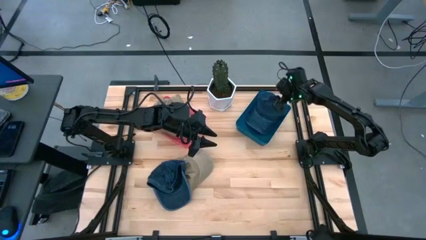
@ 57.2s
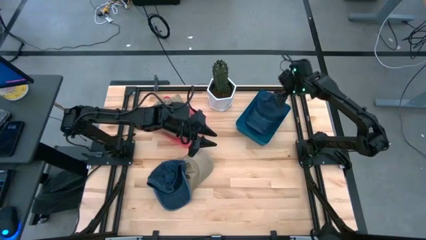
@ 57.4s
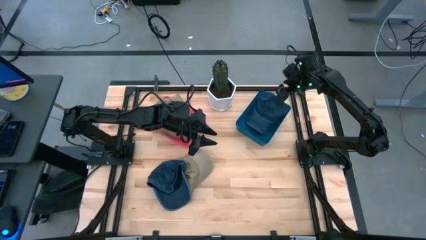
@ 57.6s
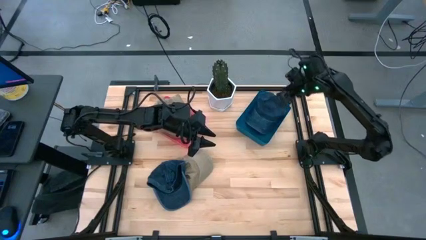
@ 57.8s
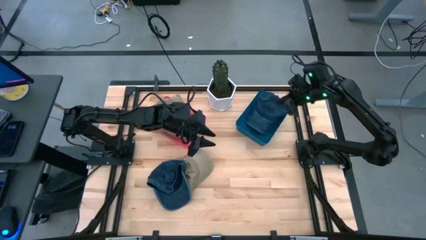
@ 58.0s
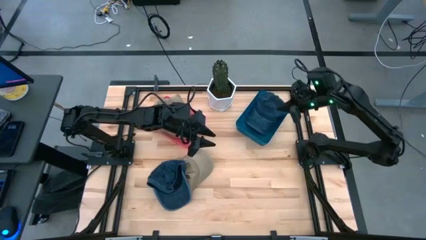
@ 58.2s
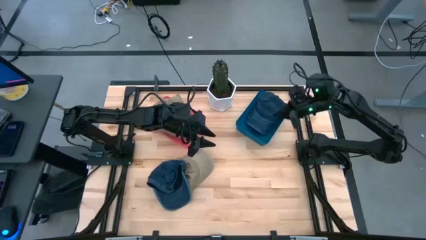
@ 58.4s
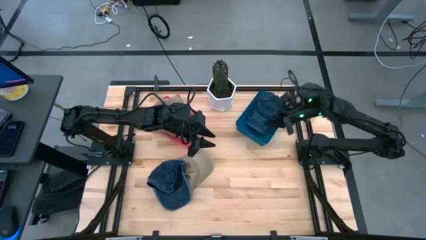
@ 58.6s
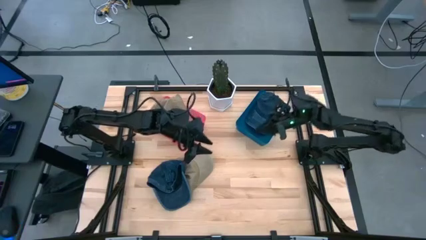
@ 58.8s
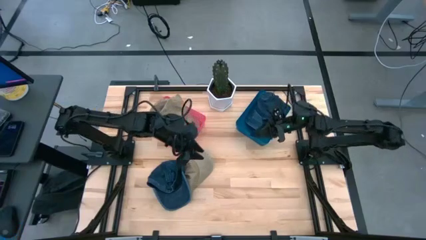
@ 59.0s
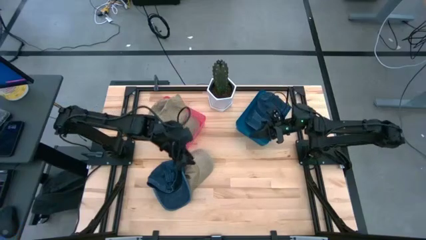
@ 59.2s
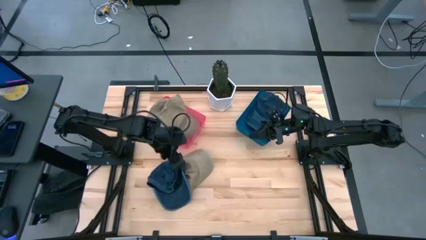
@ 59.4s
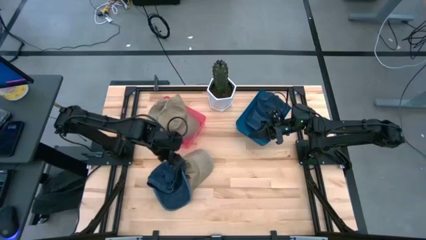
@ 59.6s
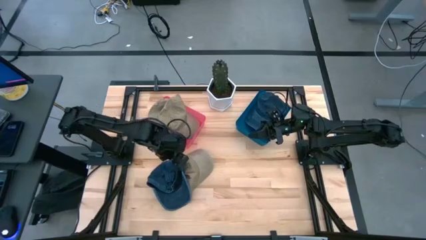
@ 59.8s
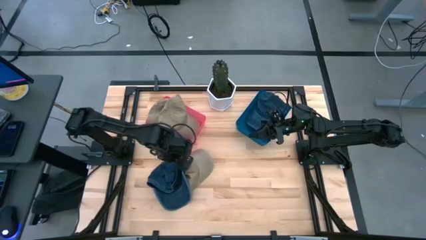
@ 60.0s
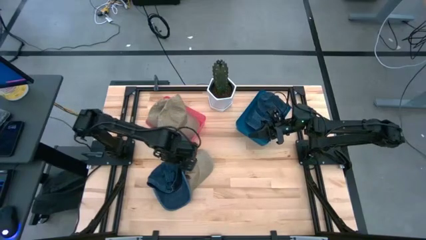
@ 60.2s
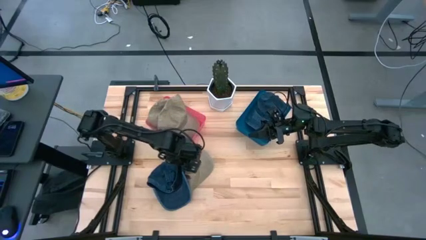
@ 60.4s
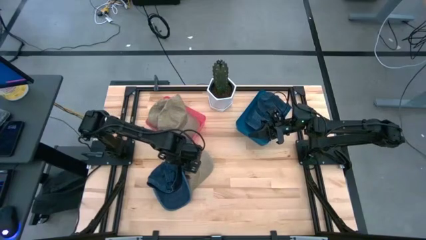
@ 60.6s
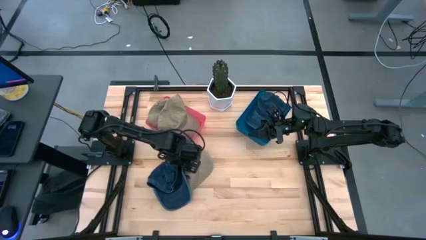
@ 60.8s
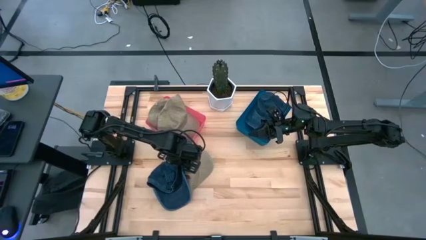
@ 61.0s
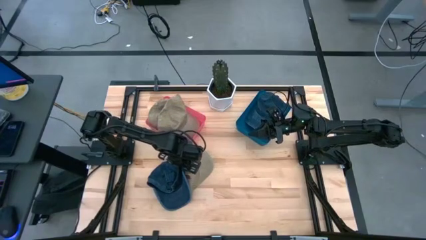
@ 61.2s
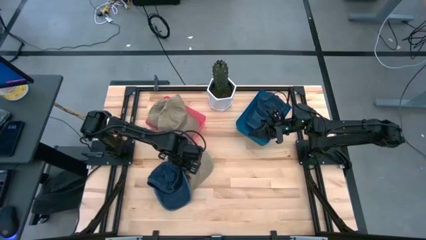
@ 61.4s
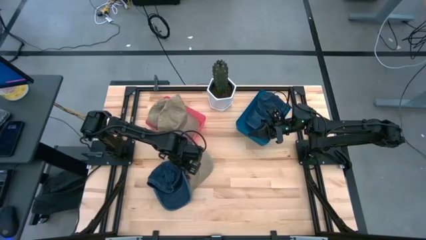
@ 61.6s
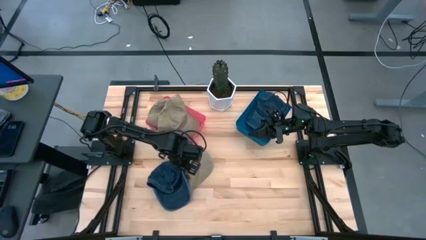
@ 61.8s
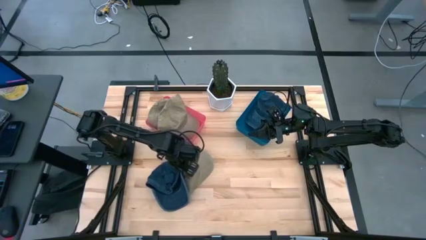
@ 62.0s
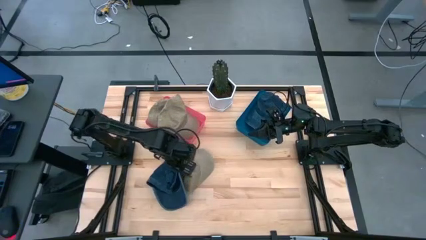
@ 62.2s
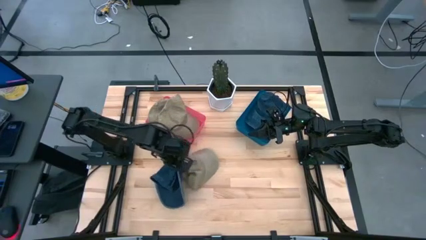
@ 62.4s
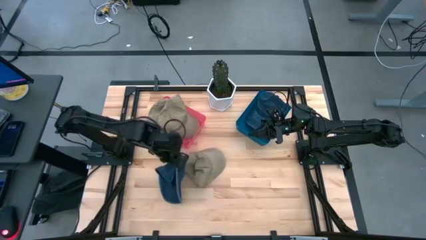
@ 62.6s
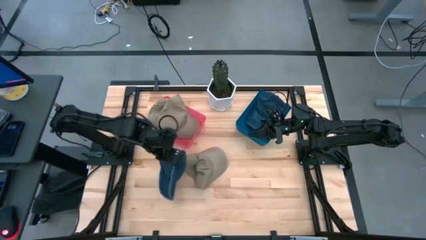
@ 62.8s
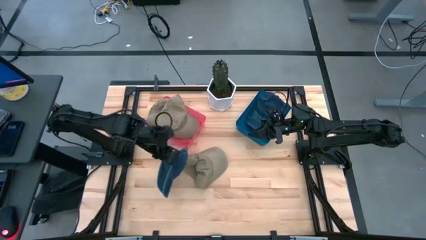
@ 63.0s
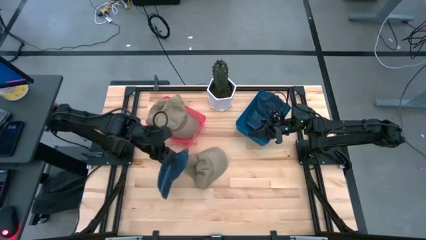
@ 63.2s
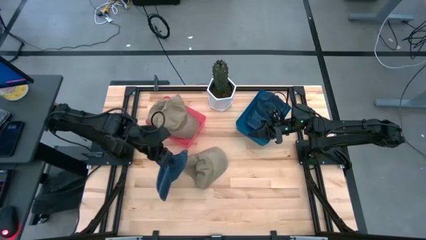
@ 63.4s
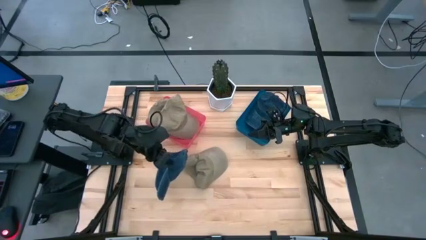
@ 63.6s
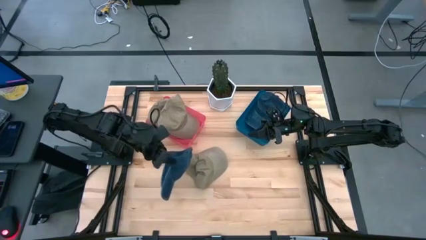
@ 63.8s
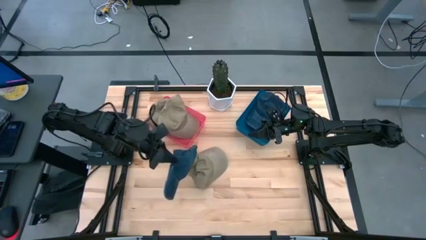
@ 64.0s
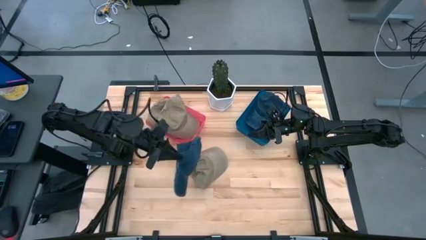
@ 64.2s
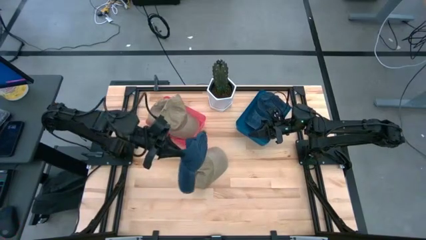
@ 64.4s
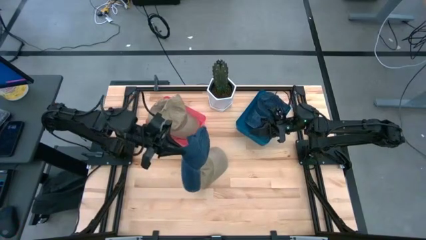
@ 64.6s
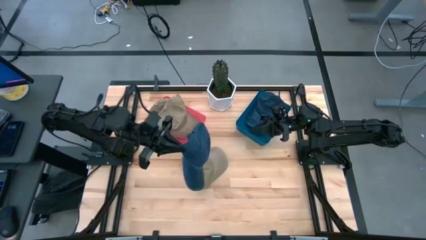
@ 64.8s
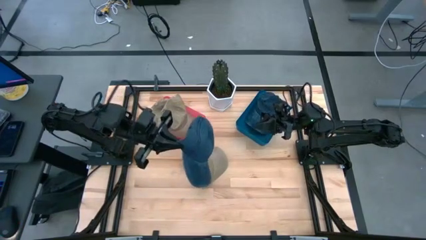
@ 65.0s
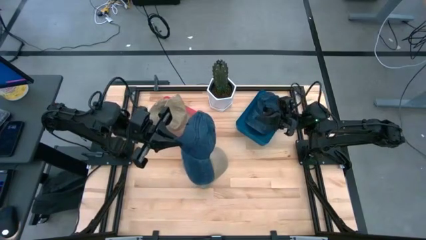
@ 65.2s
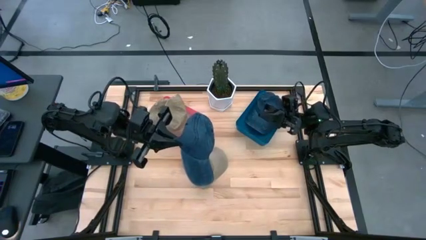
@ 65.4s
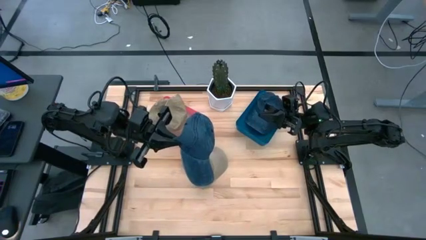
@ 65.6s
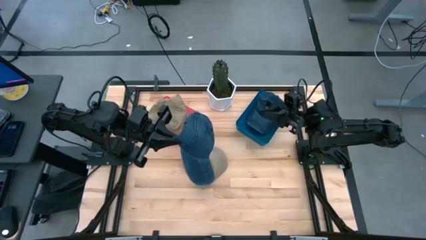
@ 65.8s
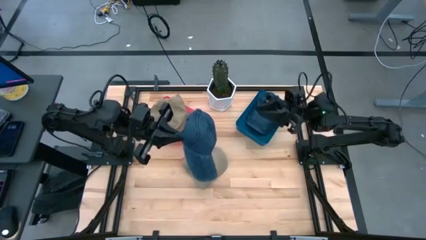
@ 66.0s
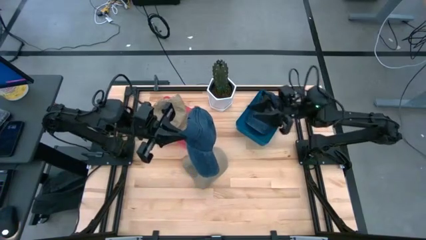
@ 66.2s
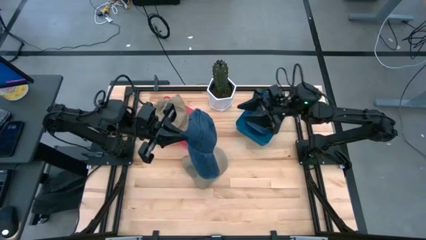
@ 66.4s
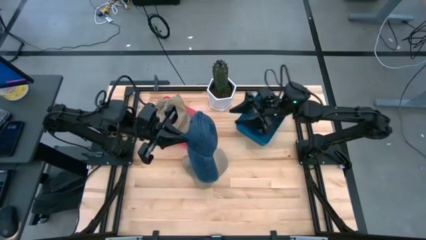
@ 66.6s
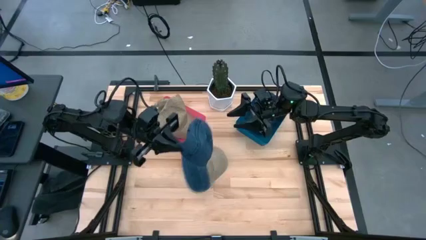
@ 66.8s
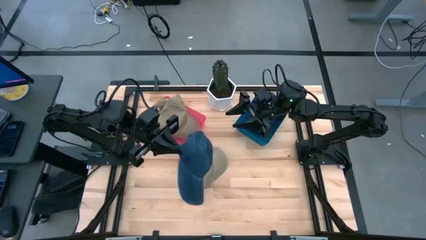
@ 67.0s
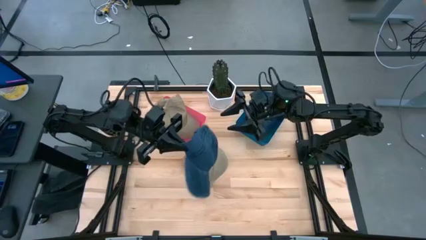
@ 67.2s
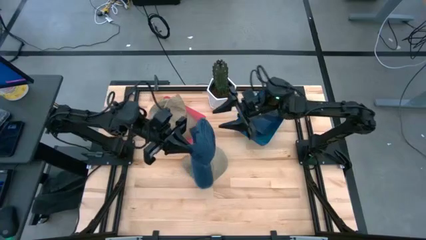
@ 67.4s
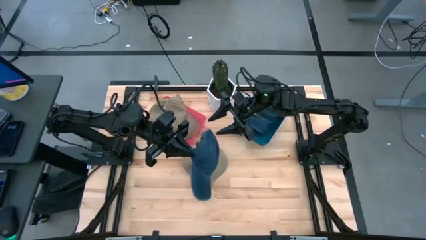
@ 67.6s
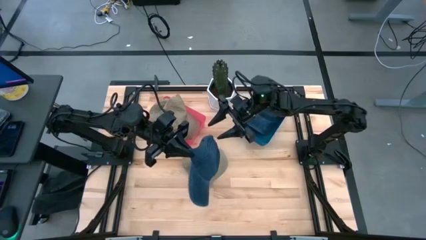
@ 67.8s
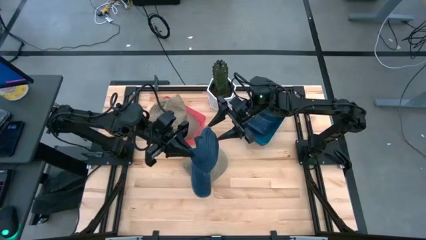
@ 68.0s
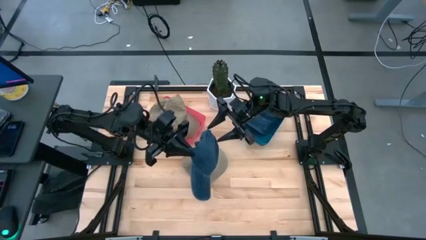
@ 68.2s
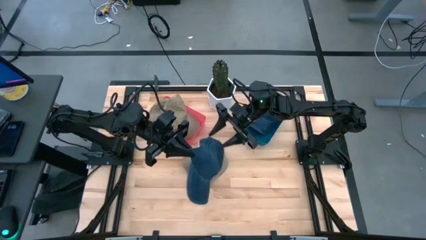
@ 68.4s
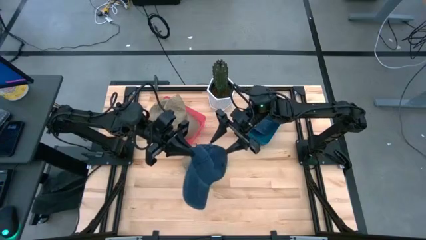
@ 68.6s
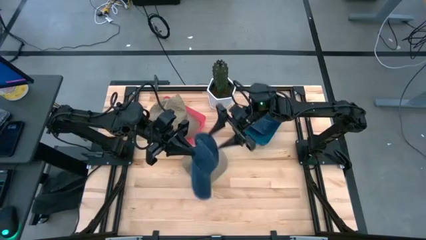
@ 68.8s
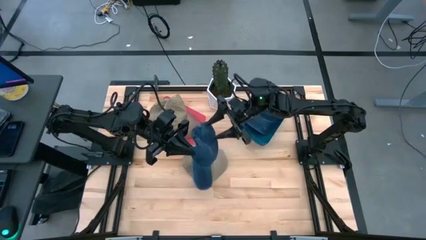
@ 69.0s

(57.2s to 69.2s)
Task: Pick & Place hat
Put the blue cap into the blue bin
